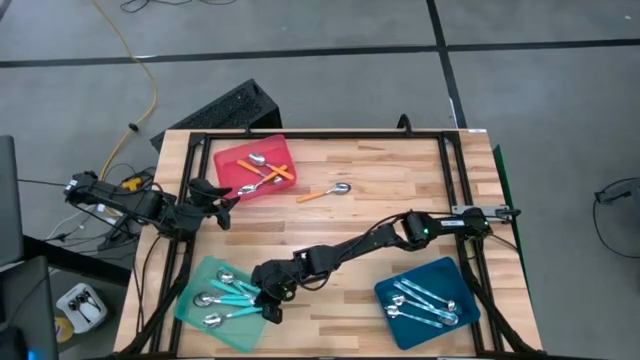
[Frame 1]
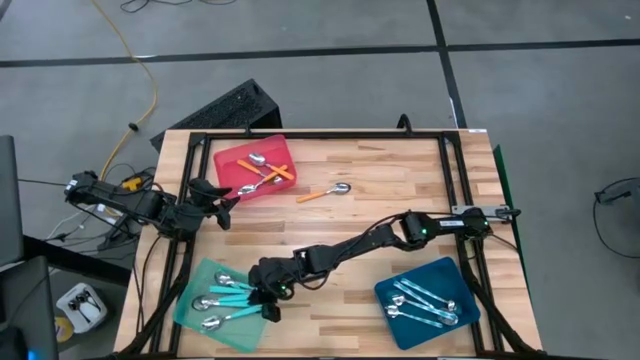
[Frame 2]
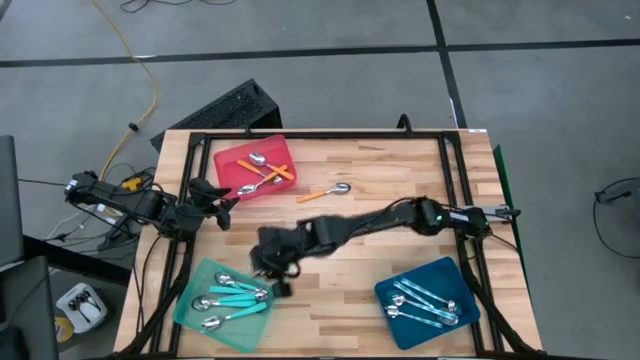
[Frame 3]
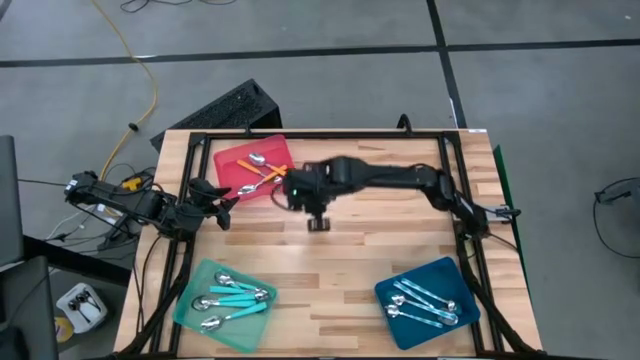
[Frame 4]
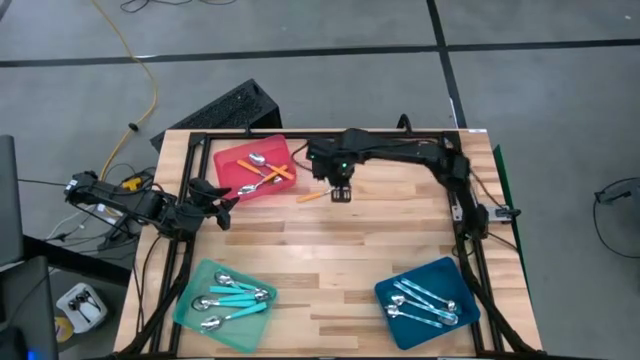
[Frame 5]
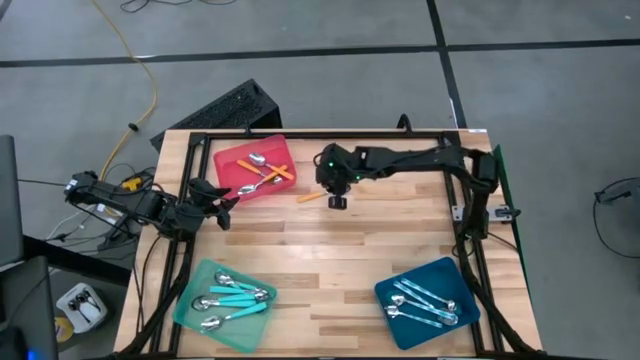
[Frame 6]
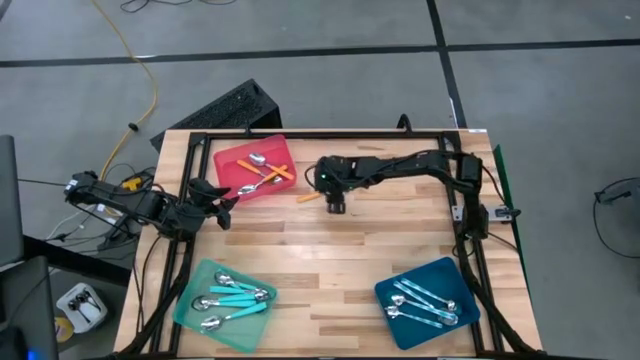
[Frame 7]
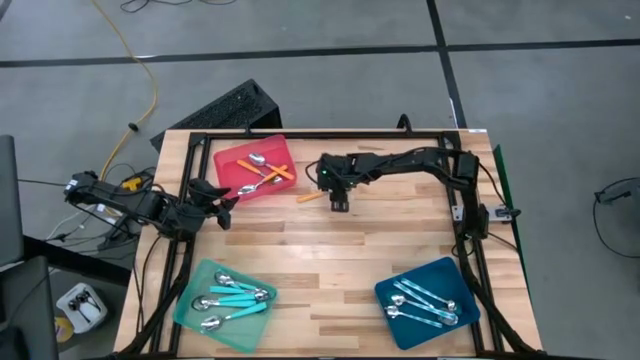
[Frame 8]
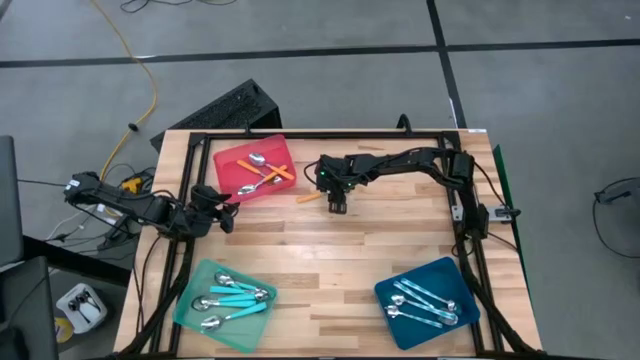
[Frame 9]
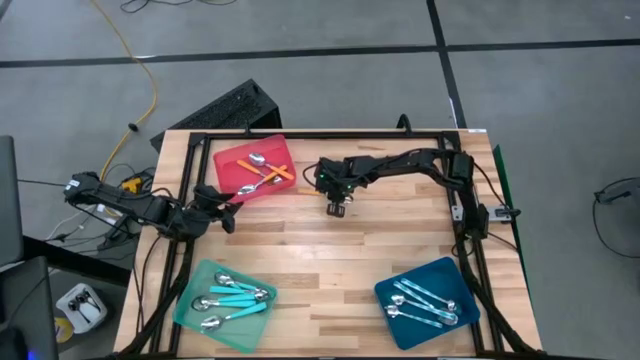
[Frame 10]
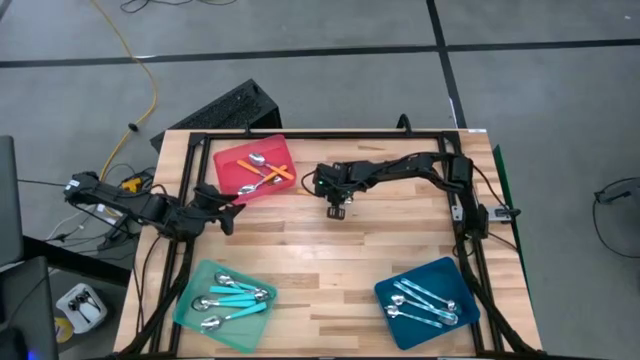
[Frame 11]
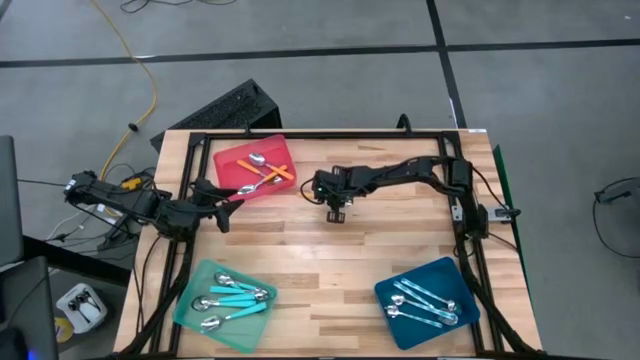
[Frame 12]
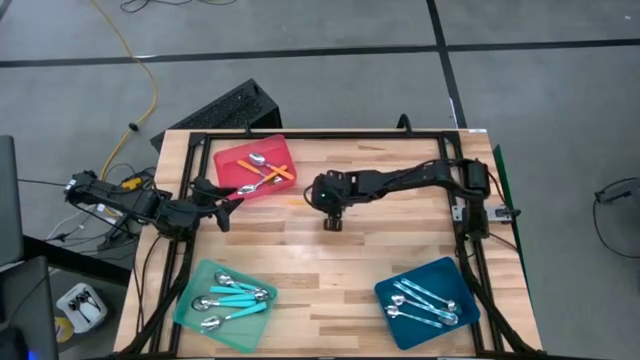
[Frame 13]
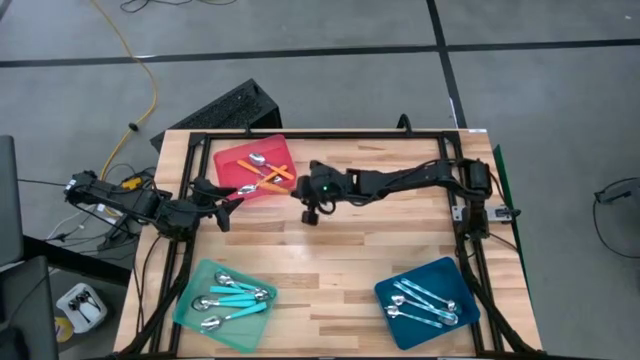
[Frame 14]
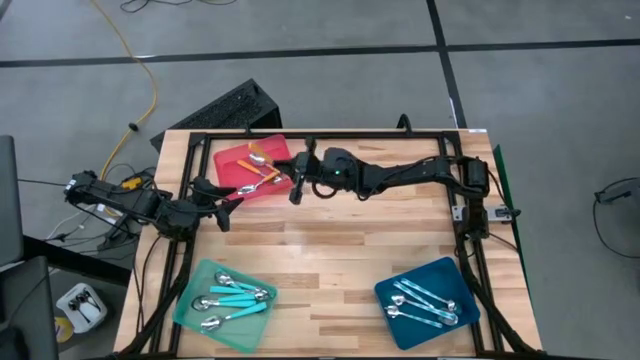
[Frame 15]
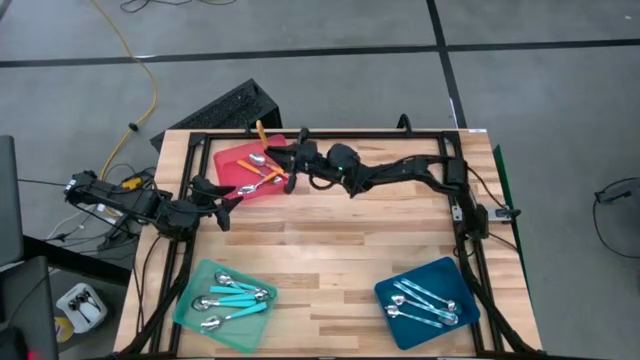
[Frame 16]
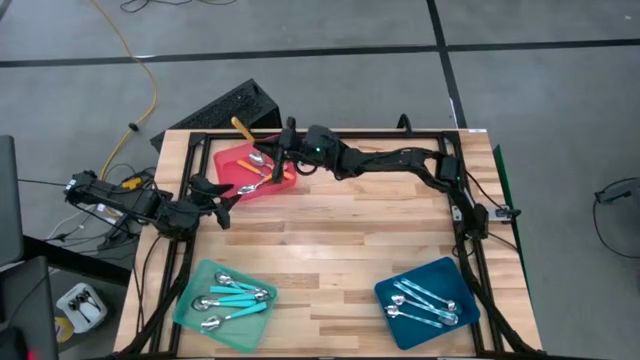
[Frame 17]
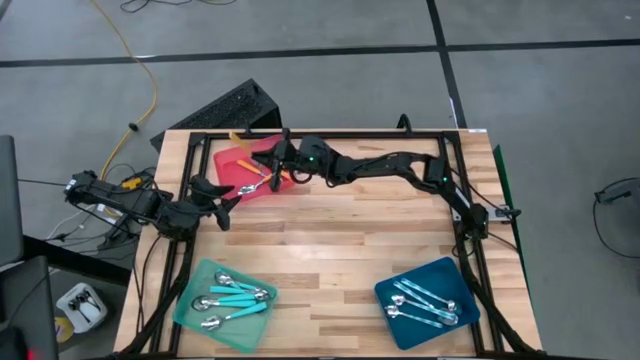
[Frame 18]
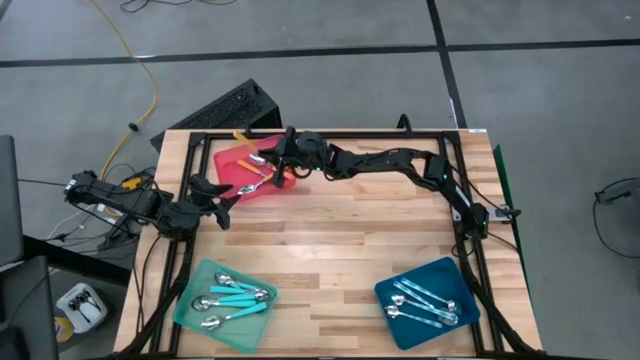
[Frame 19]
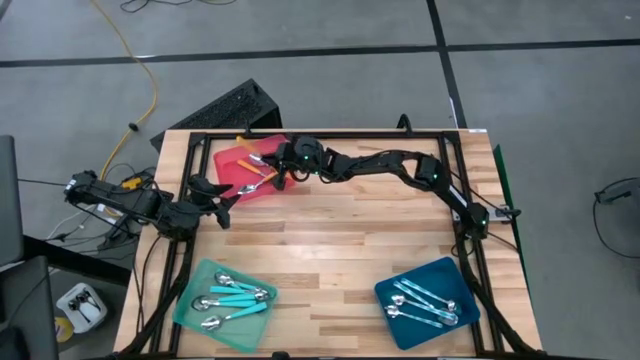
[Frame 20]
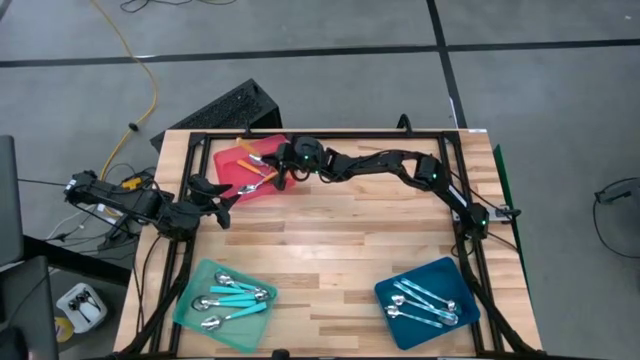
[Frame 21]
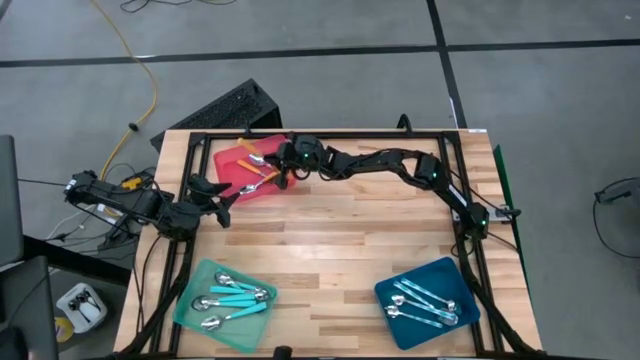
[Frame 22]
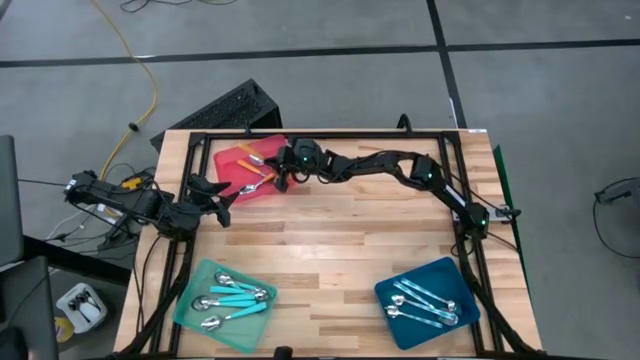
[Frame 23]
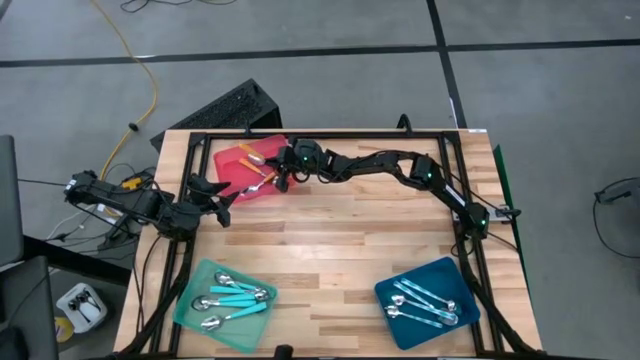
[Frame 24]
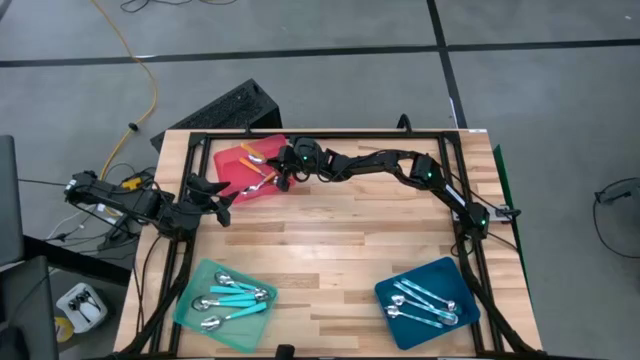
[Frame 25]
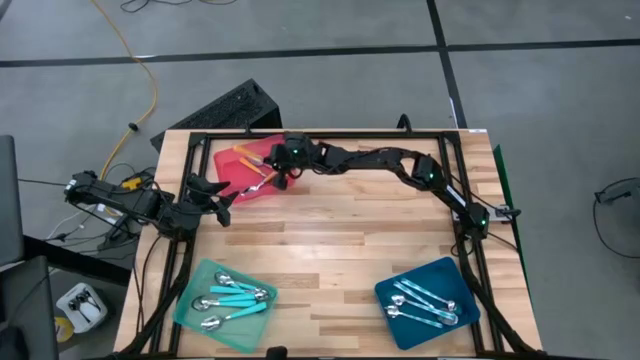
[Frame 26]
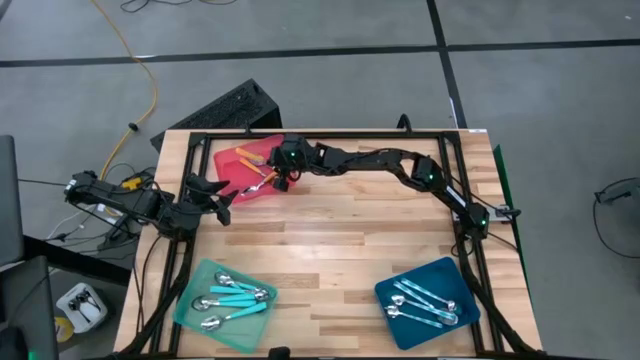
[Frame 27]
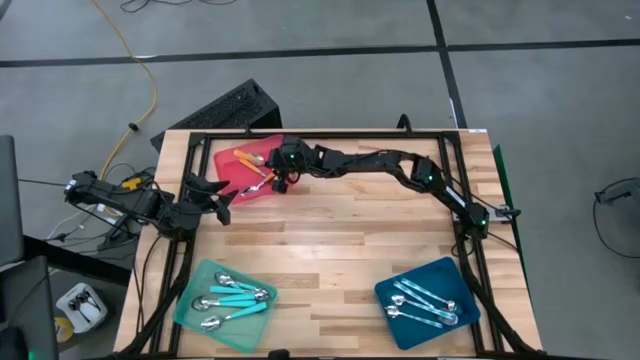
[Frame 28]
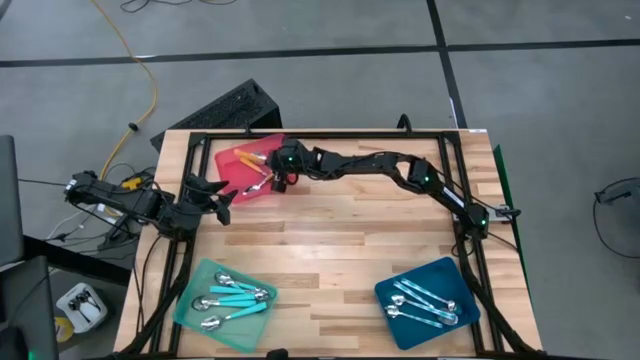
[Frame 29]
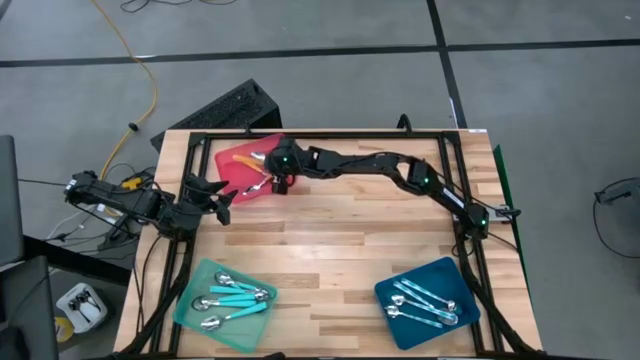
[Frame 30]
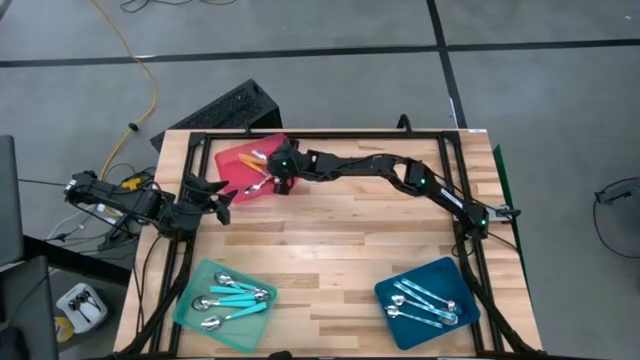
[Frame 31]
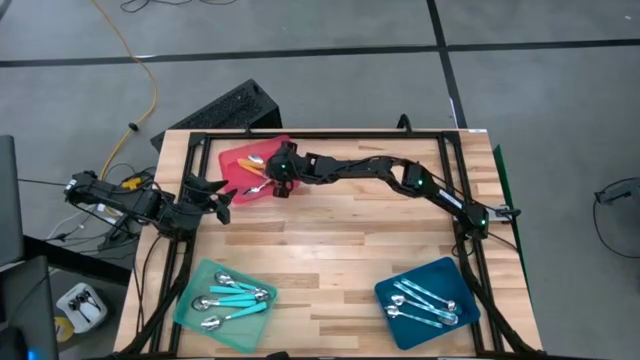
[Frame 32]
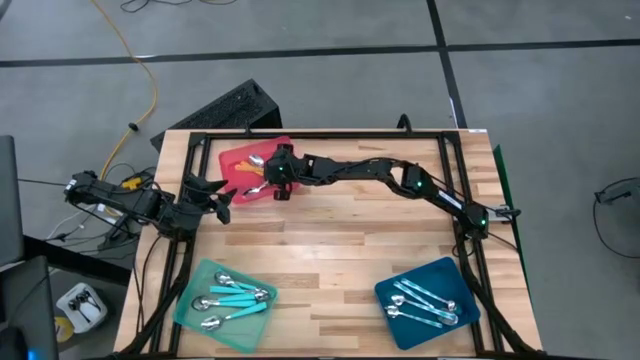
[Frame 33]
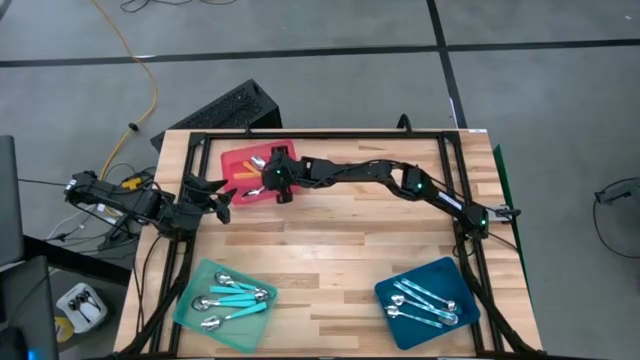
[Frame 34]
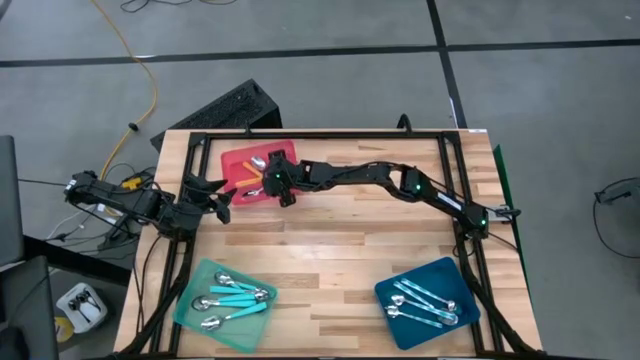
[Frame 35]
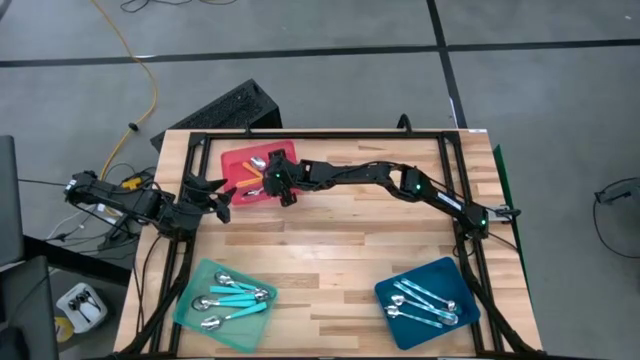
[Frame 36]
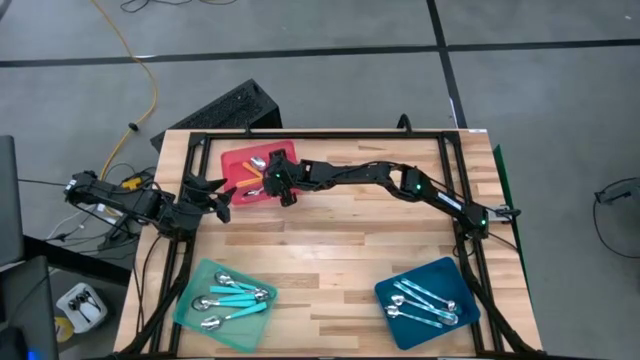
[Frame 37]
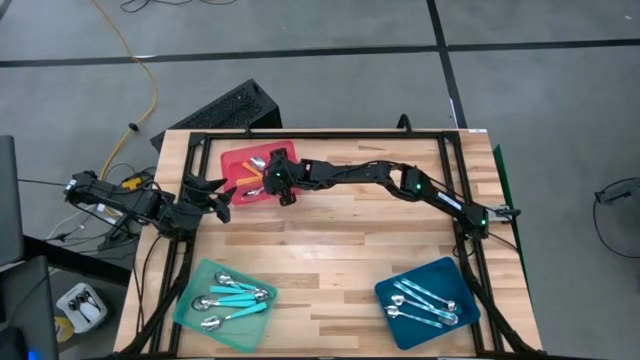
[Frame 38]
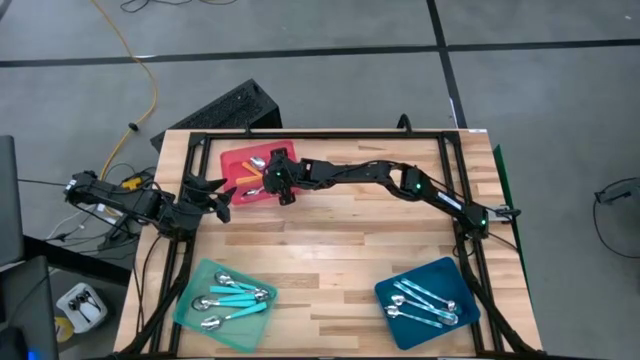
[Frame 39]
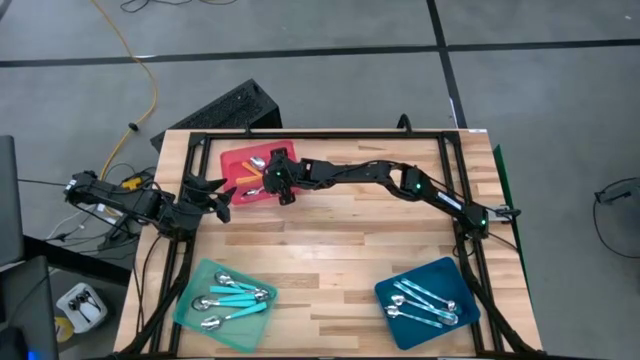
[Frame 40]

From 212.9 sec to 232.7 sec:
Task: Sort silverware by color (type)
Put the yellow spoon into the pink bin

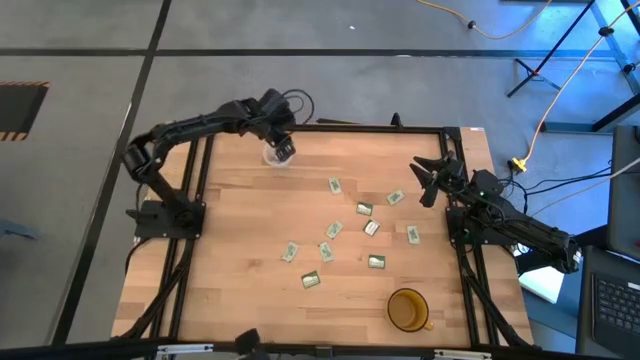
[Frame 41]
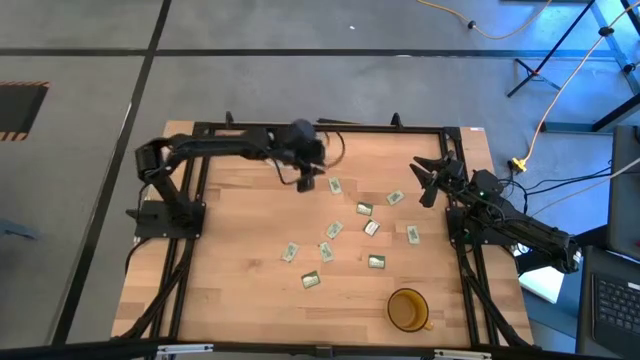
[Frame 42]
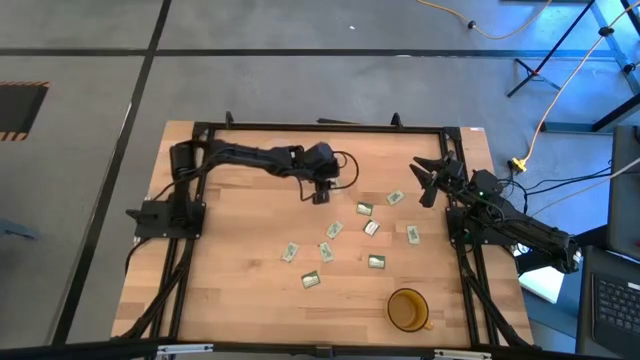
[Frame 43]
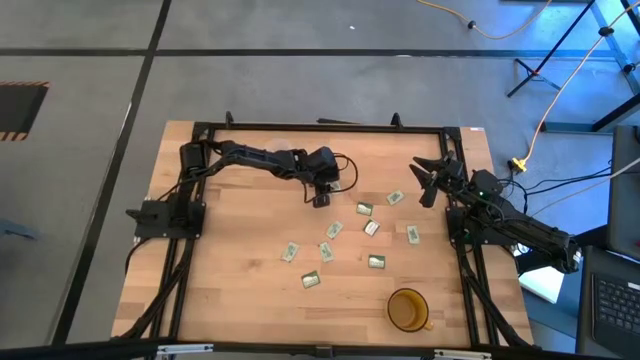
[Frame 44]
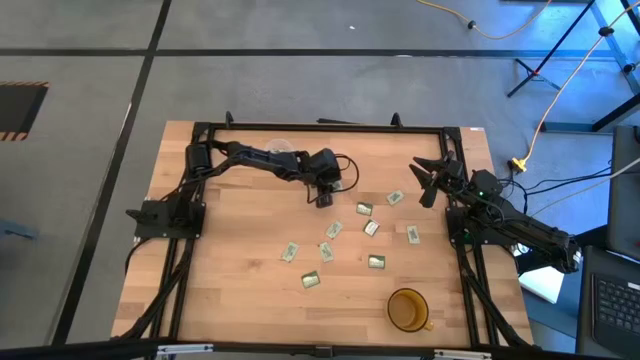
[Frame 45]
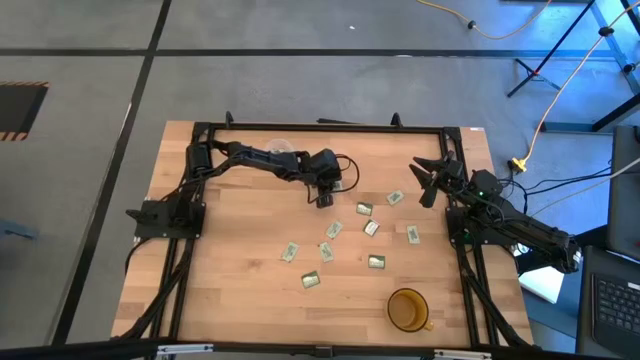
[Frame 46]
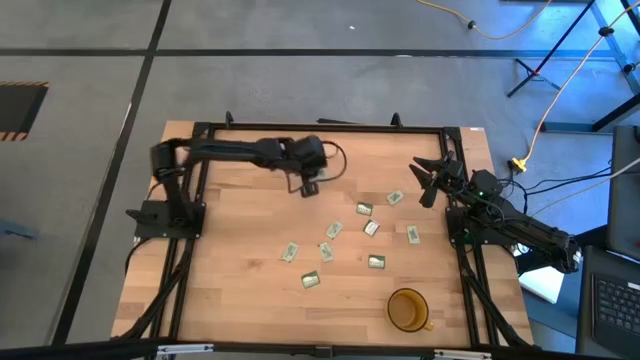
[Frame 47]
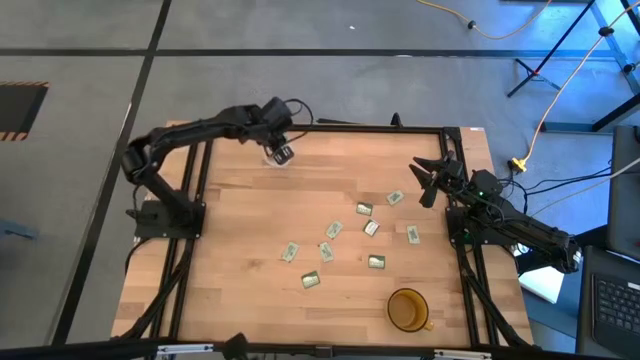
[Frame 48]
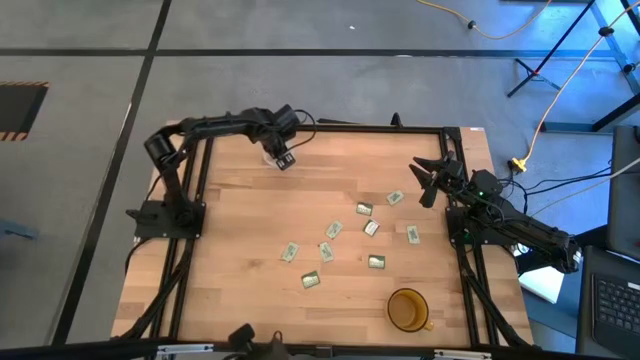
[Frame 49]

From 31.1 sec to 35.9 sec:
Task: Pick and place Stevia / Truvia into bins
Put the stevia packet into the transparent container
